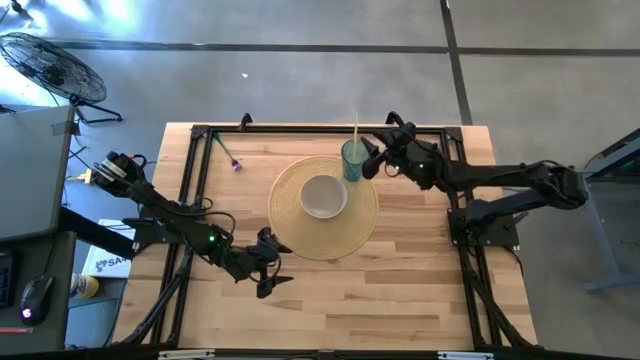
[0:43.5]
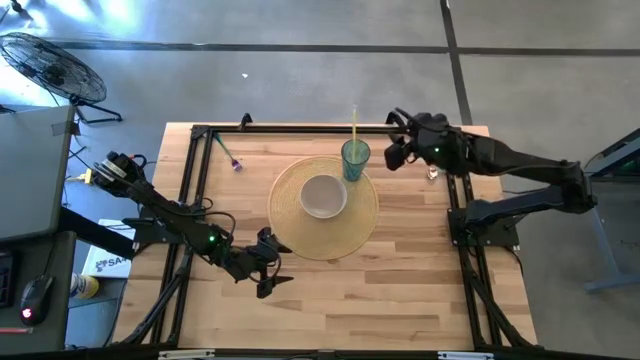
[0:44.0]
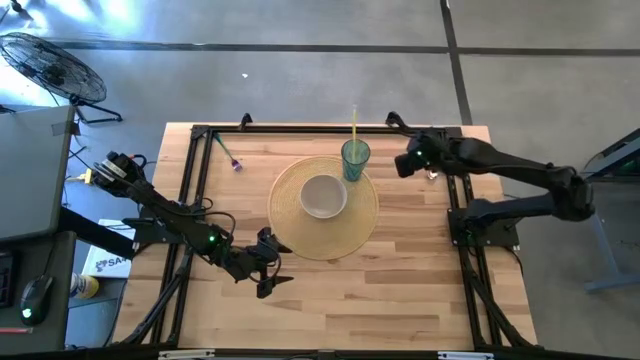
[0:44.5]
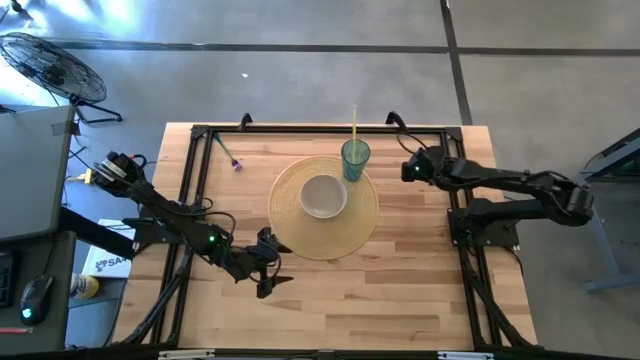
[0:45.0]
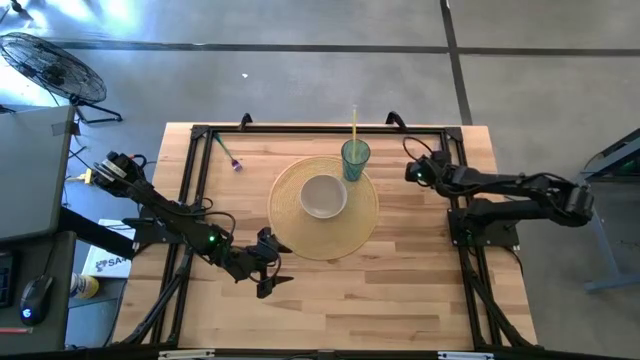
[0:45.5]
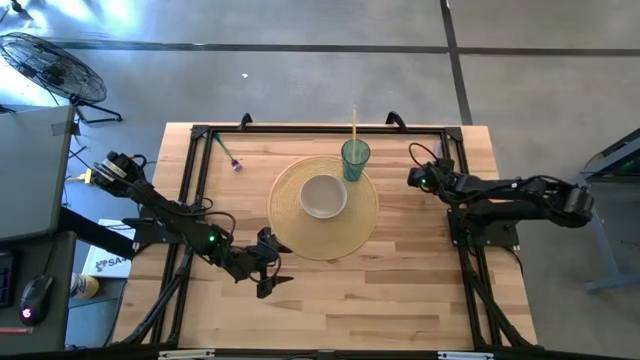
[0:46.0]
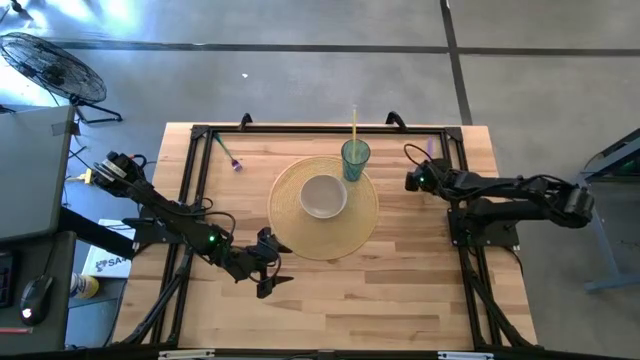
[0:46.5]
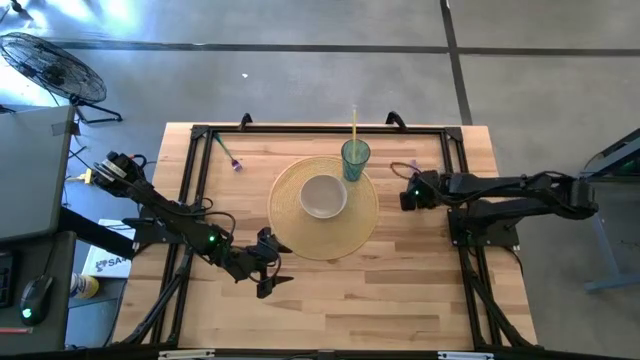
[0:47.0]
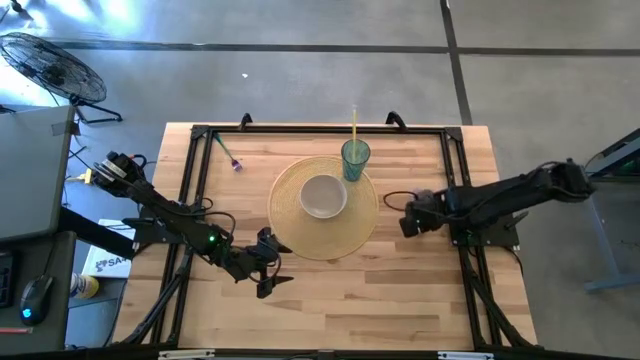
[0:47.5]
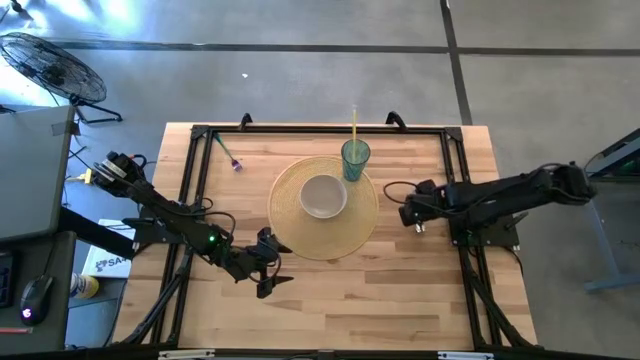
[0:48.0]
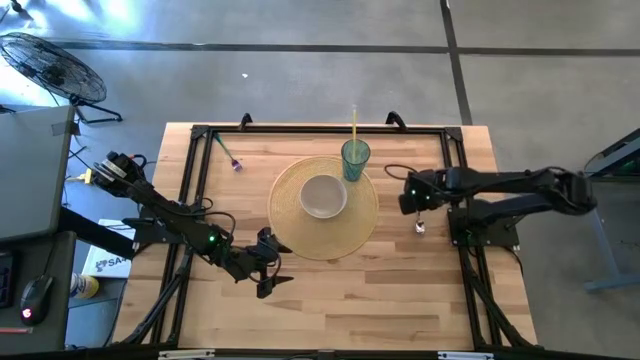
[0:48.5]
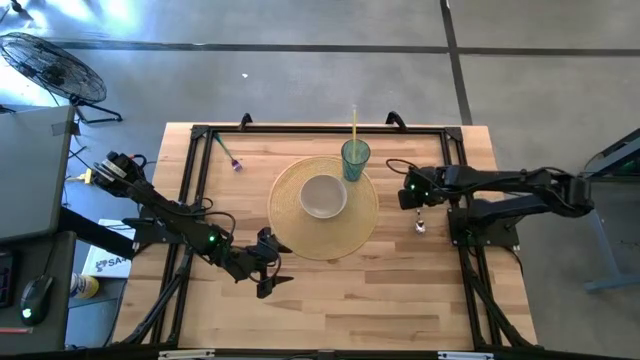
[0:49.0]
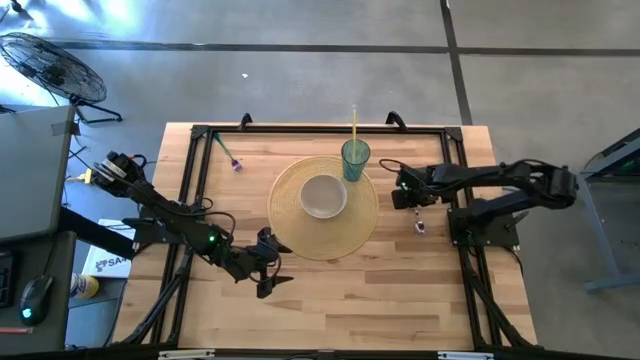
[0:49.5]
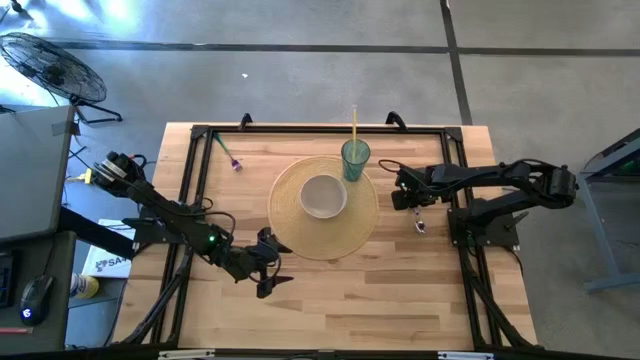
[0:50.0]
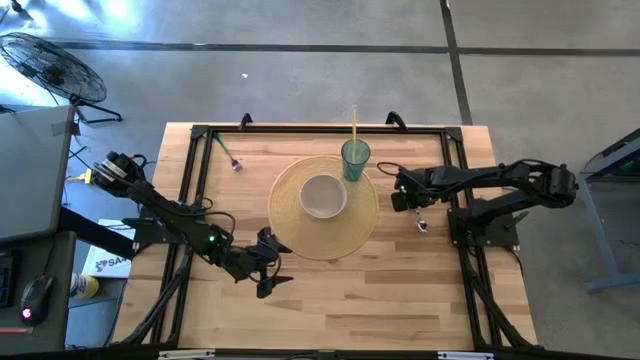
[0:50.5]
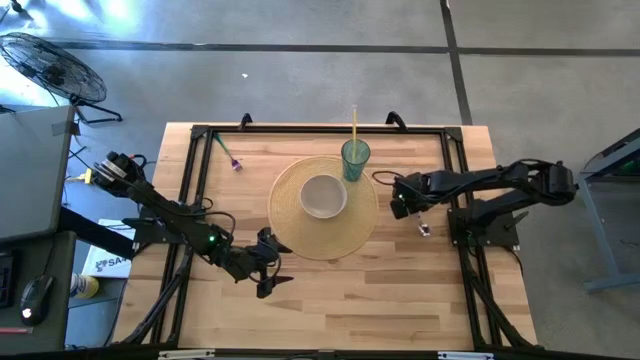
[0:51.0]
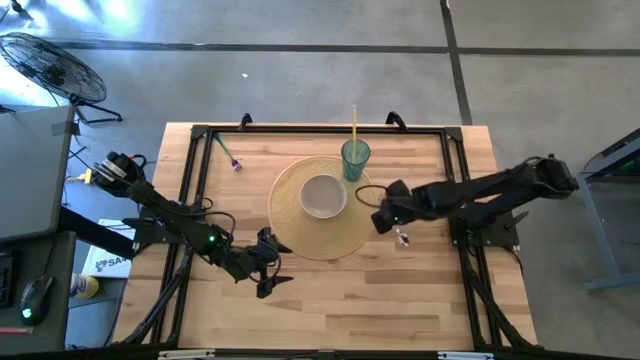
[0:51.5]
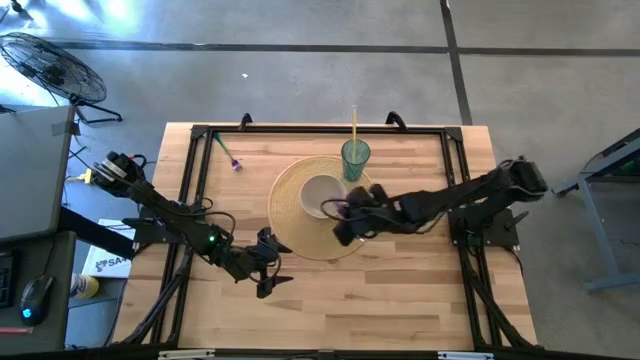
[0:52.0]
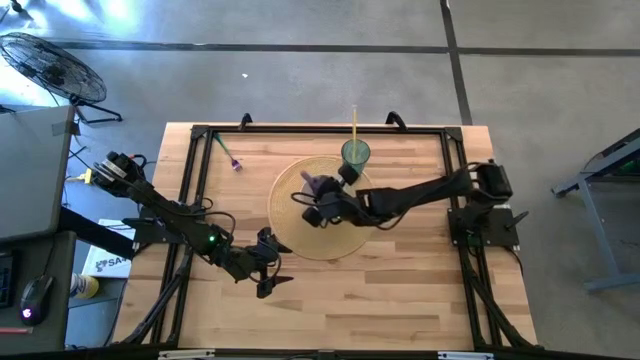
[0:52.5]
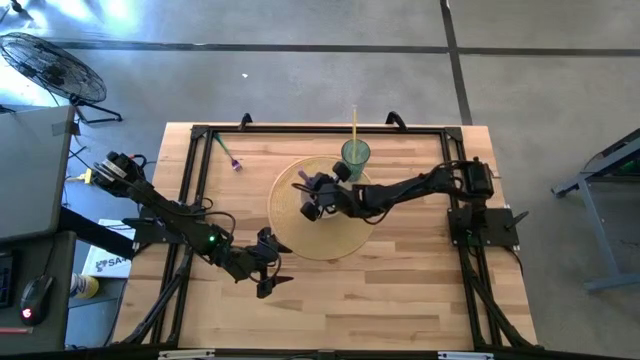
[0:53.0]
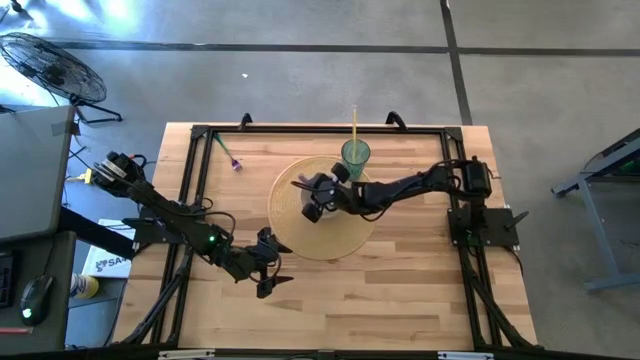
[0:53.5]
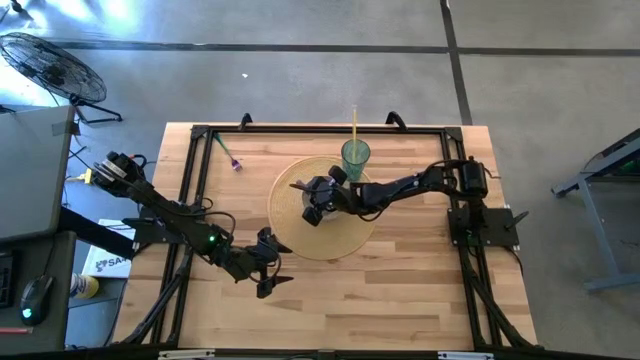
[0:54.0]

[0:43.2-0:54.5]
Task: Pick & Place Utensil
Put the purple spoon into the white bowl

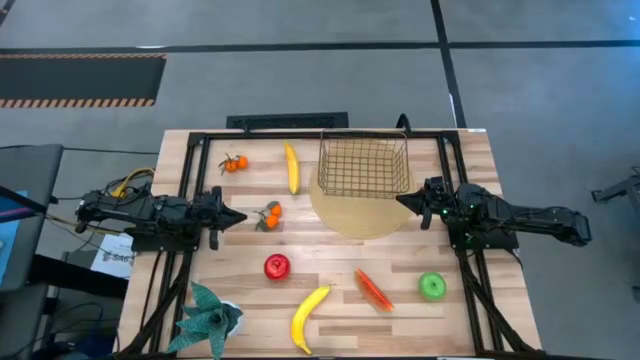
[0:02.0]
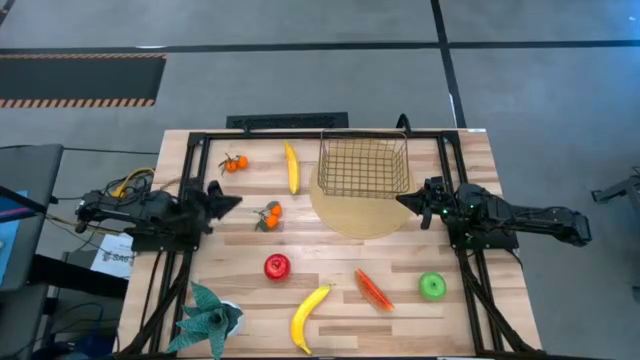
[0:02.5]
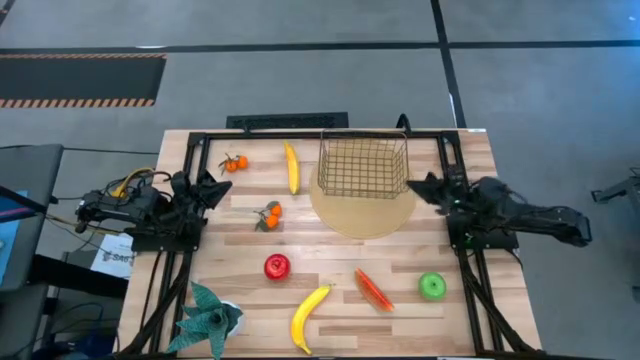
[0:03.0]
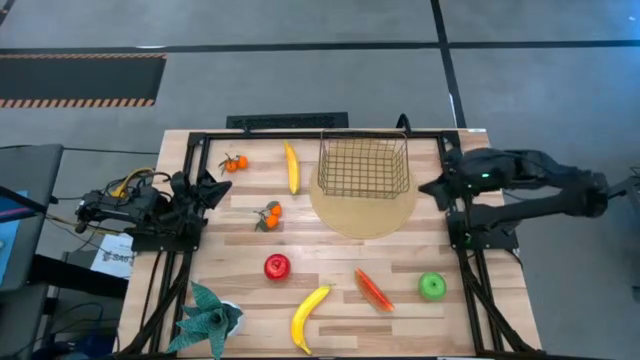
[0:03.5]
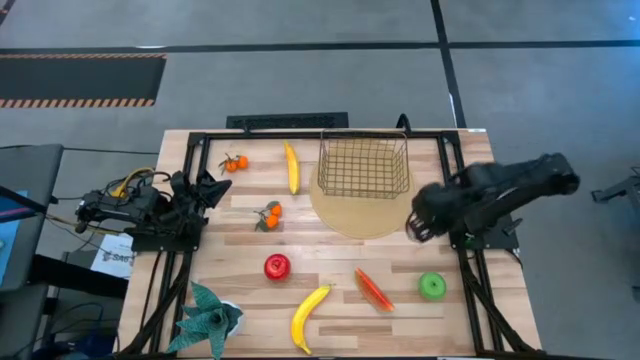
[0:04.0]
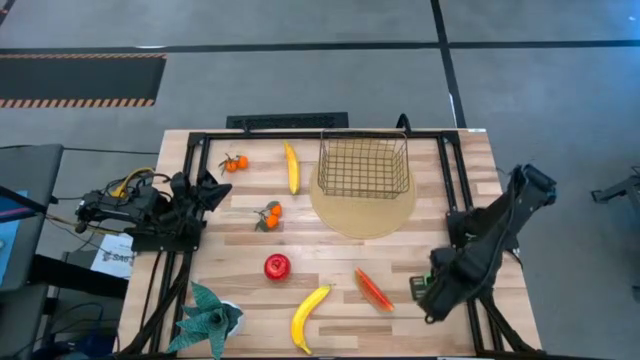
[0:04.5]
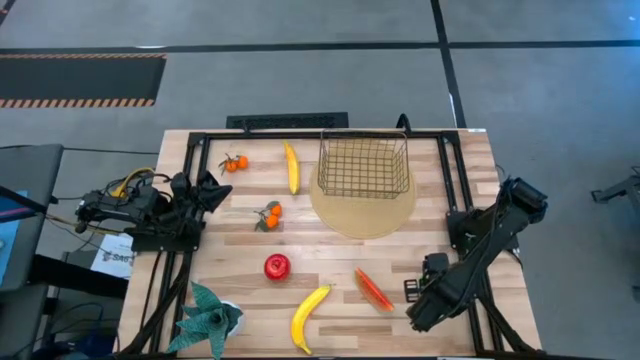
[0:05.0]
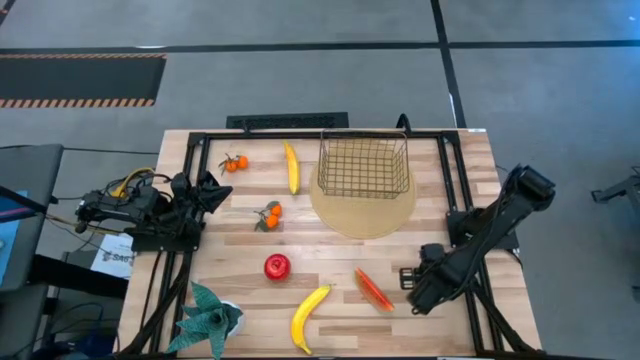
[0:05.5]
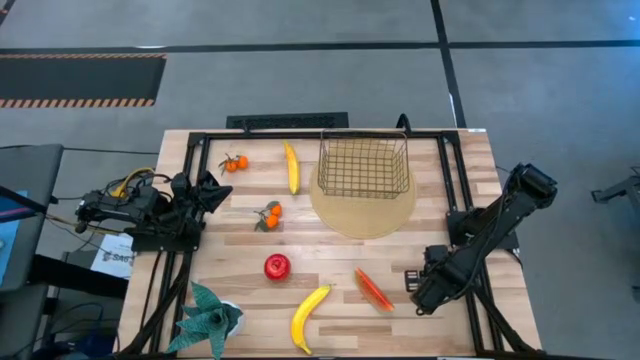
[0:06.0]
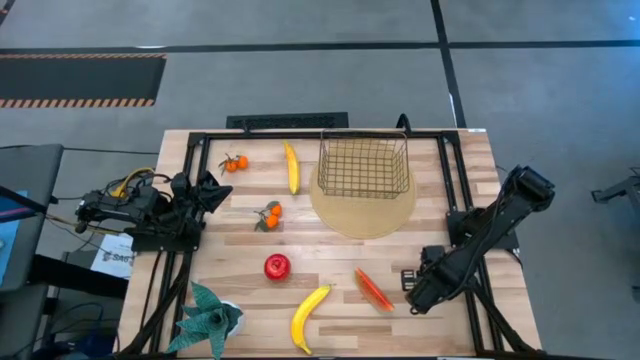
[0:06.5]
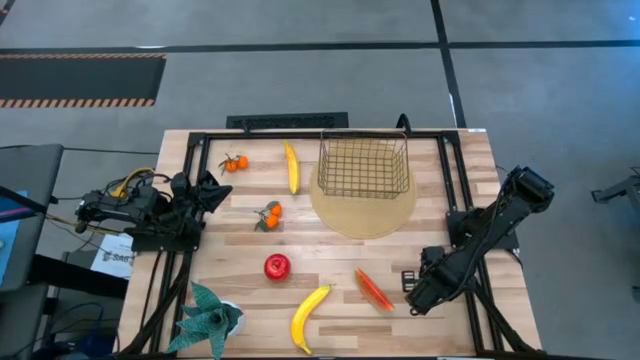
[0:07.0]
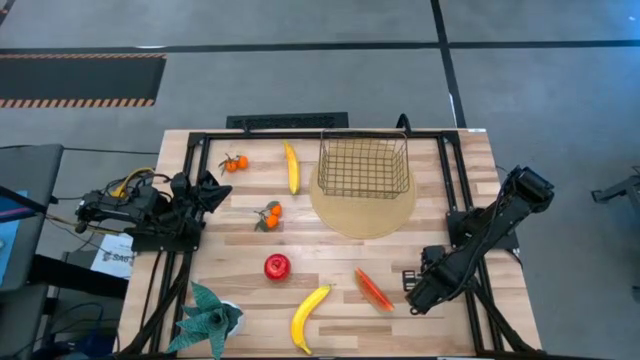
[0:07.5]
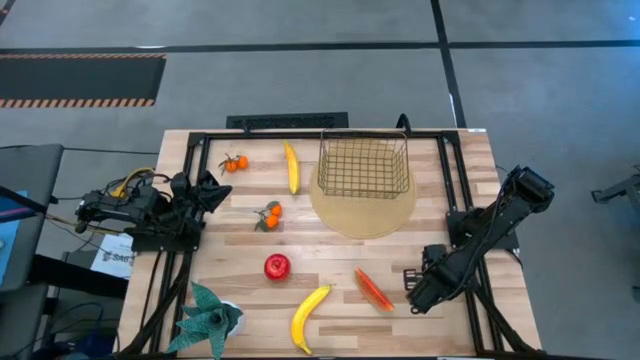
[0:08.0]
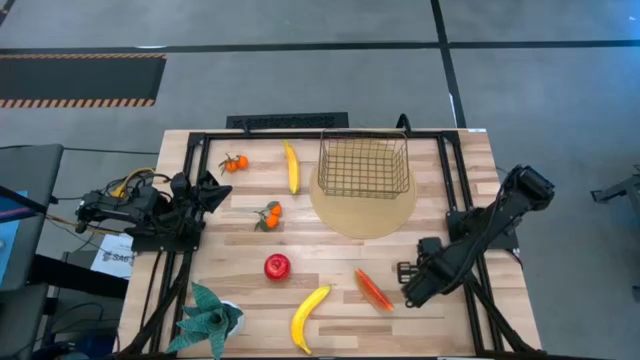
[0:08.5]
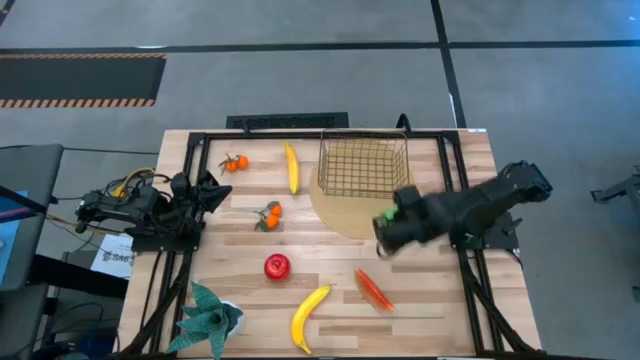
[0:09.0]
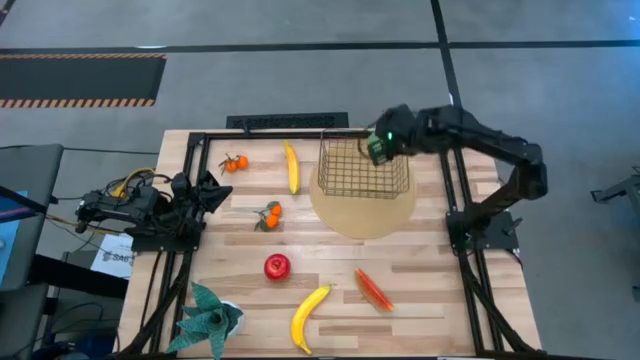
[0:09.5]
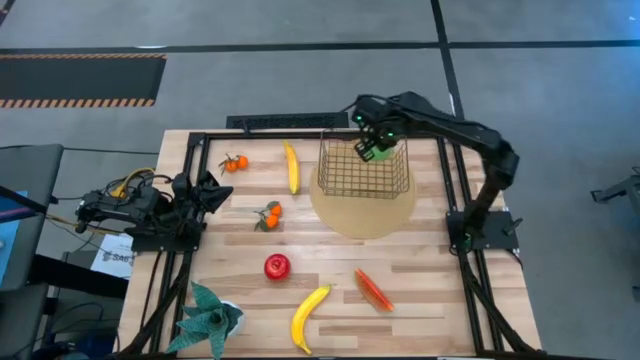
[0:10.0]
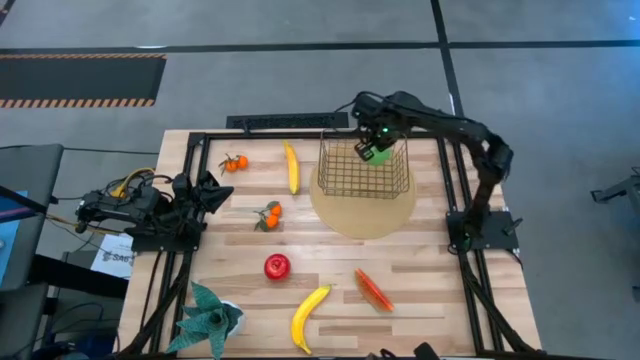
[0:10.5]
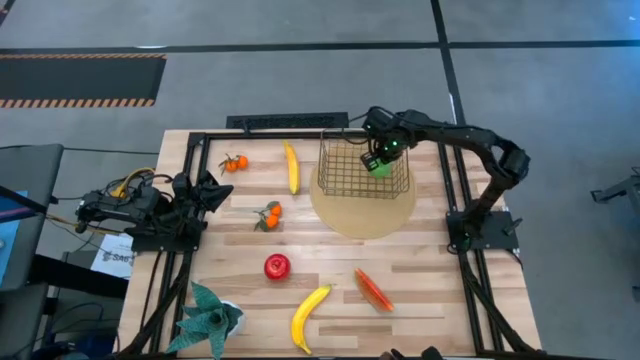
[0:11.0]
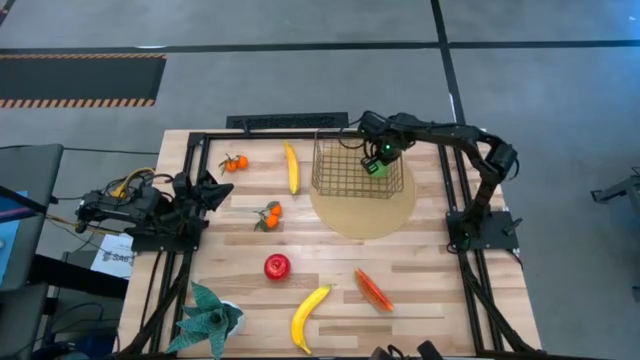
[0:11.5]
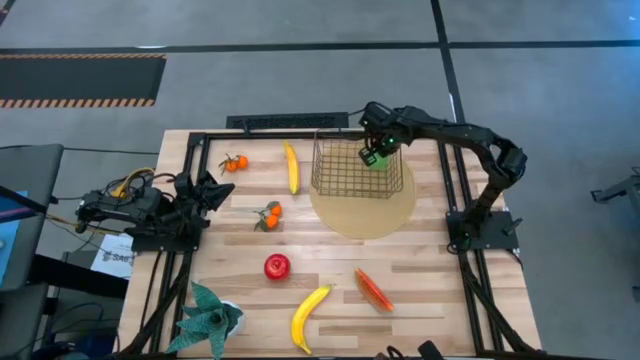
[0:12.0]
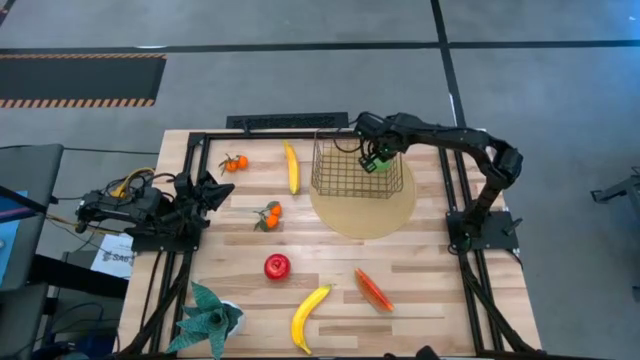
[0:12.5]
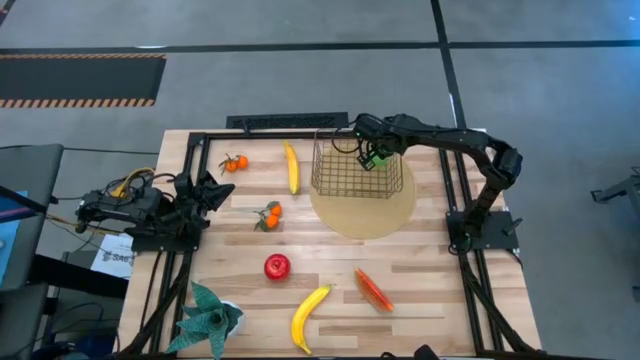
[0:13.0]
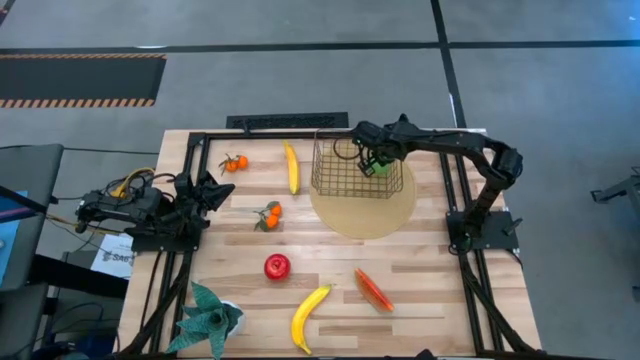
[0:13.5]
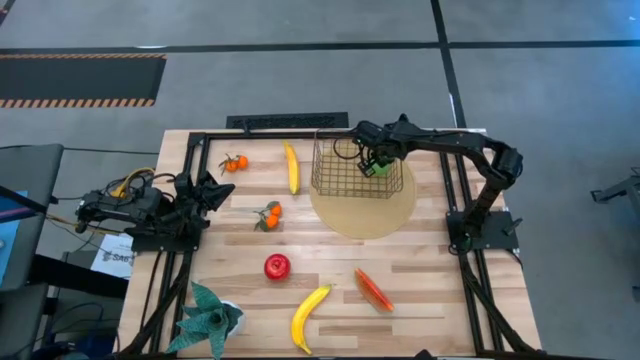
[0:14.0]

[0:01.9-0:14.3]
Task: Build produce basket
Put the green apple into the wire basket
